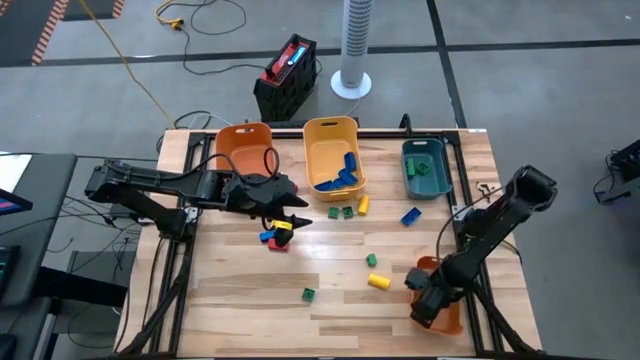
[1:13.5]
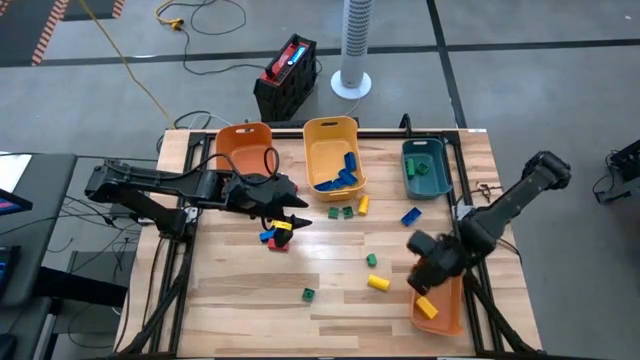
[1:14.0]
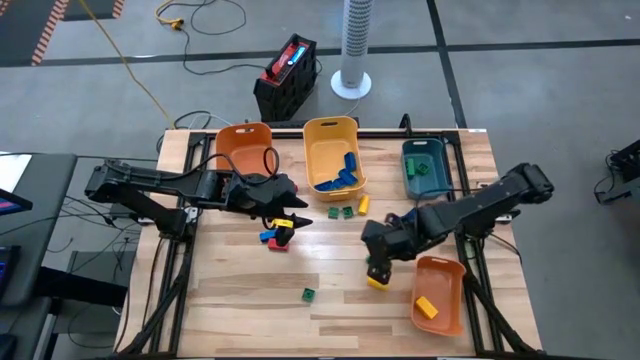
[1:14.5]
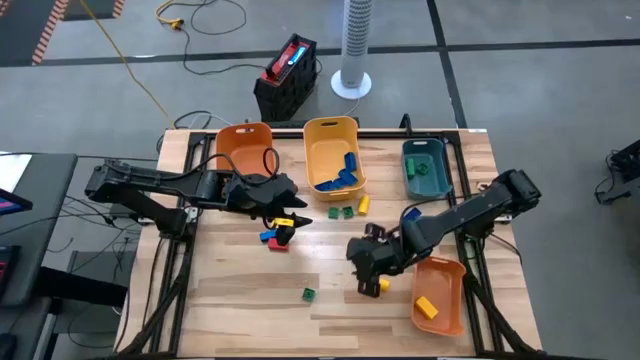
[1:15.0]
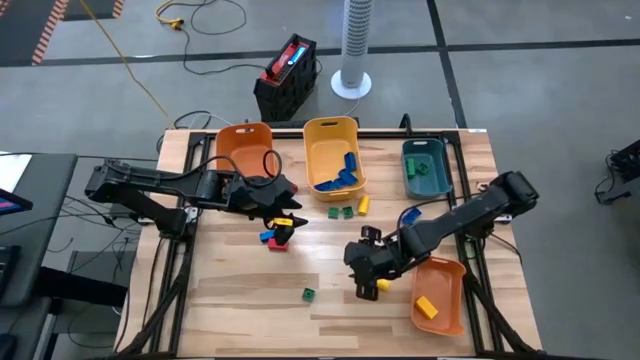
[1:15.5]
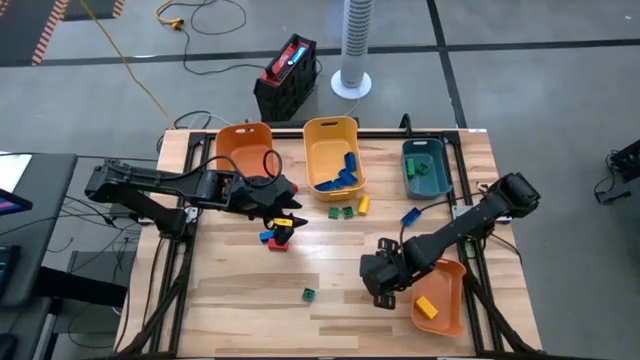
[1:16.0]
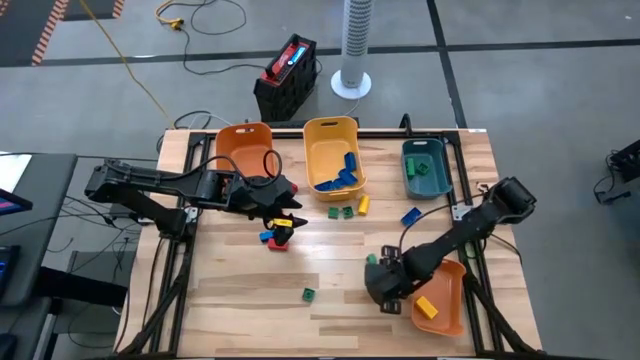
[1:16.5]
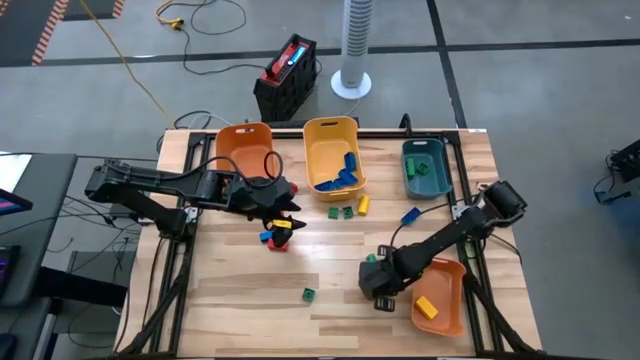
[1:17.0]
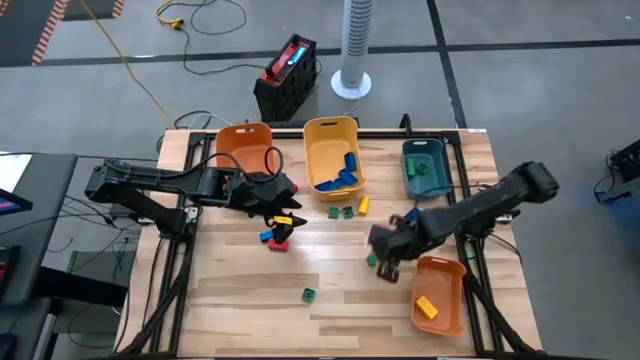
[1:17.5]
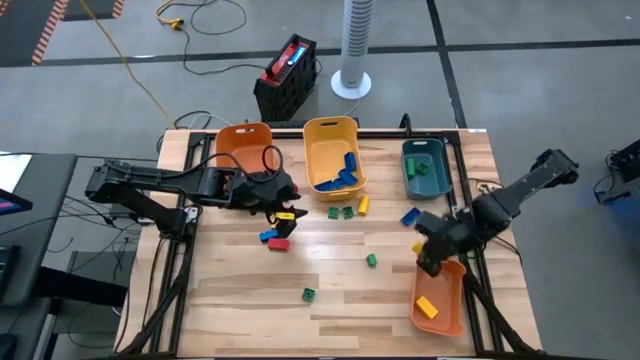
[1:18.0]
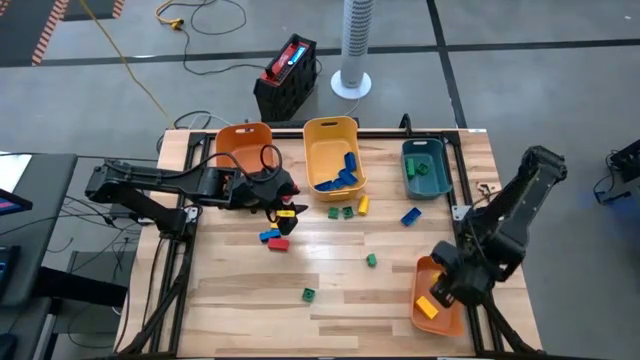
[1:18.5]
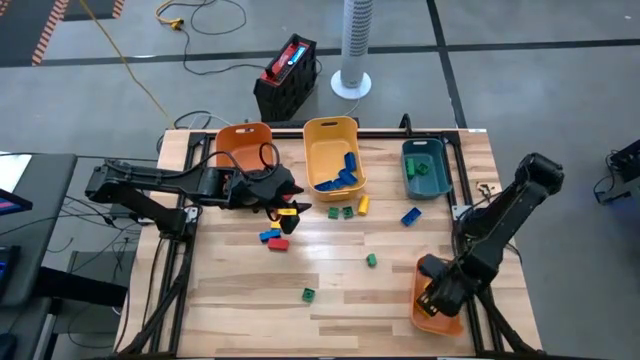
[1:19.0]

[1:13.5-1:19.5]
Task: Sort blocks
Put the yellow block into the bottom orange bin

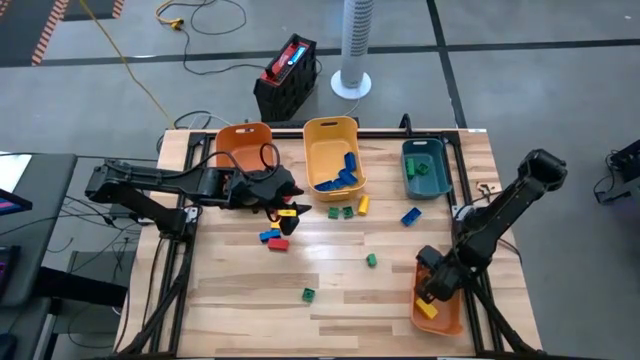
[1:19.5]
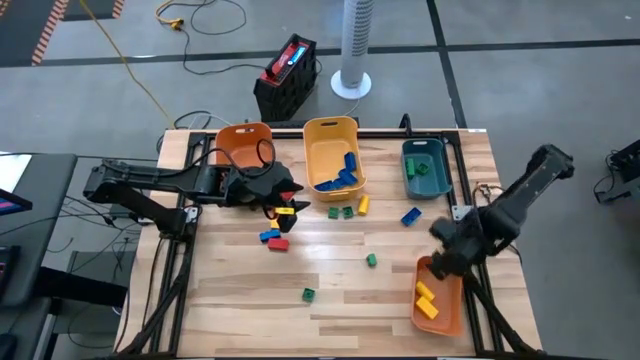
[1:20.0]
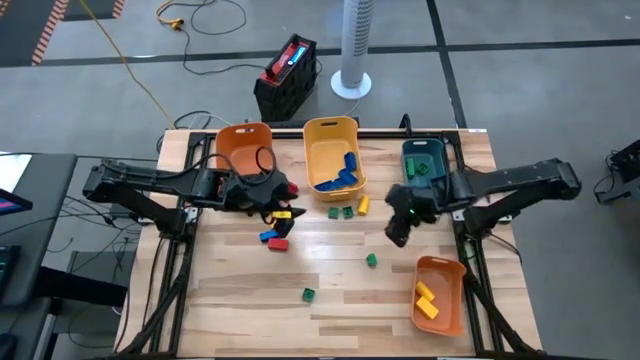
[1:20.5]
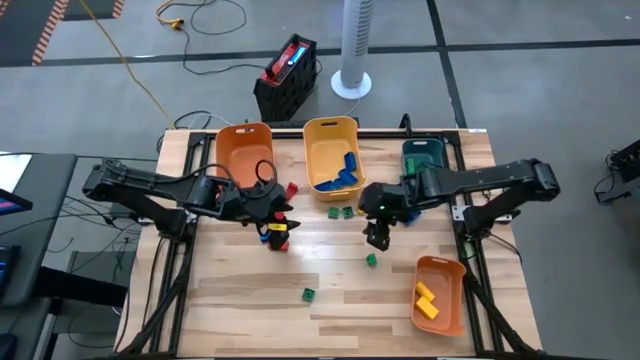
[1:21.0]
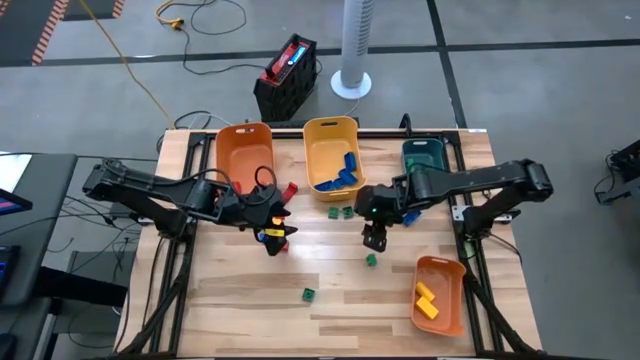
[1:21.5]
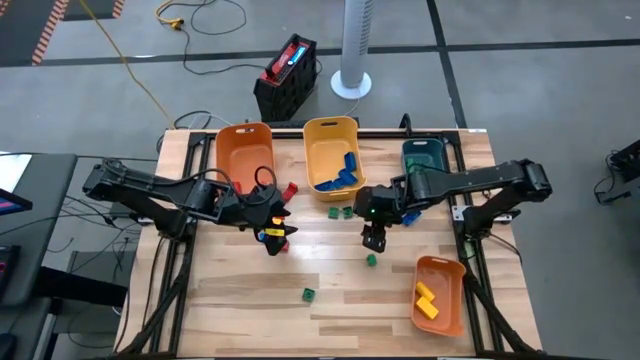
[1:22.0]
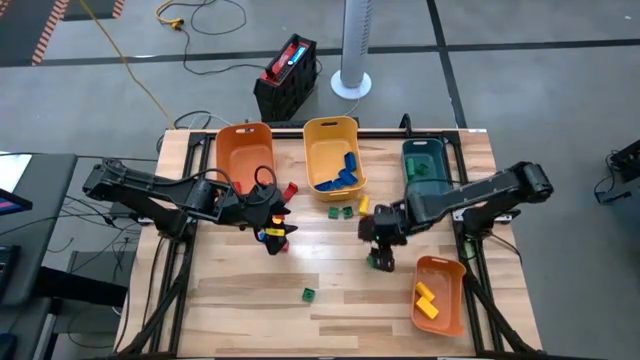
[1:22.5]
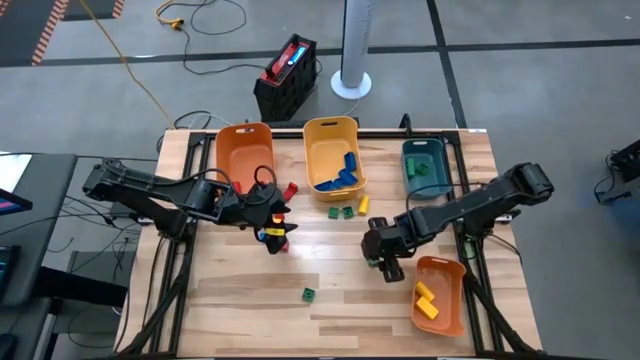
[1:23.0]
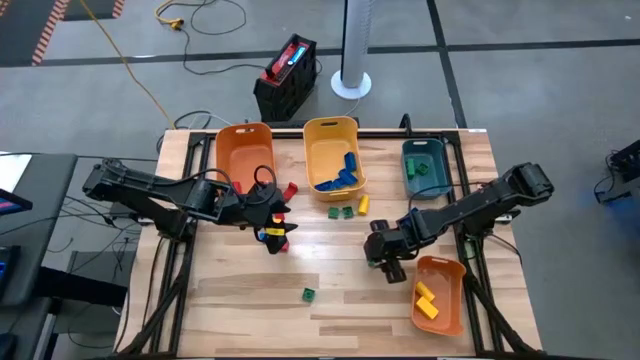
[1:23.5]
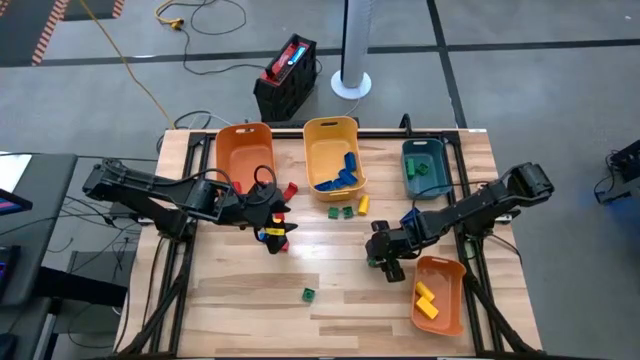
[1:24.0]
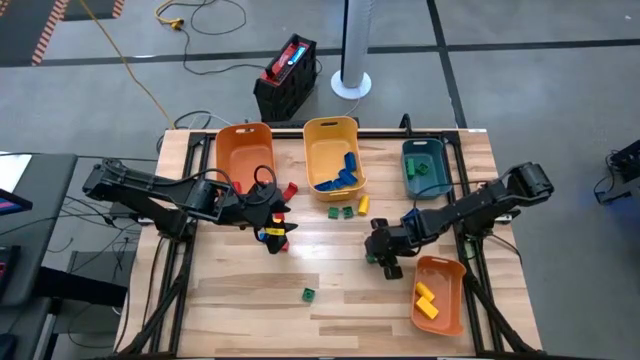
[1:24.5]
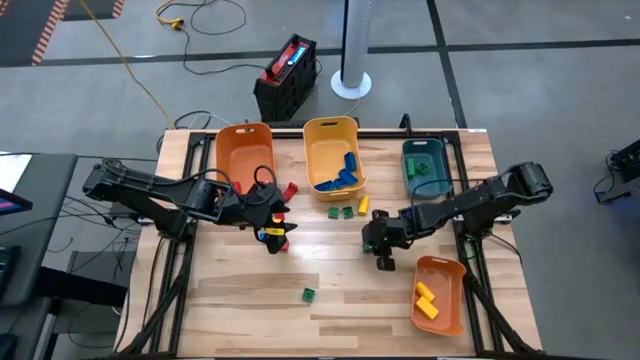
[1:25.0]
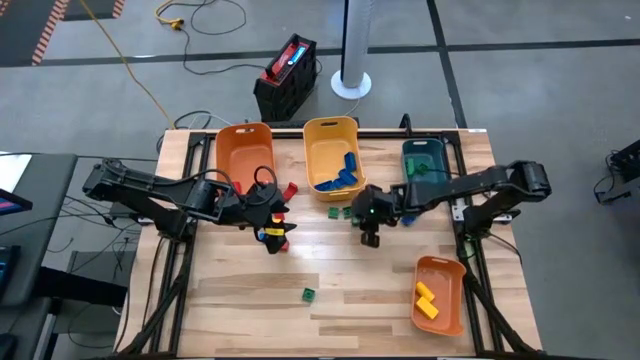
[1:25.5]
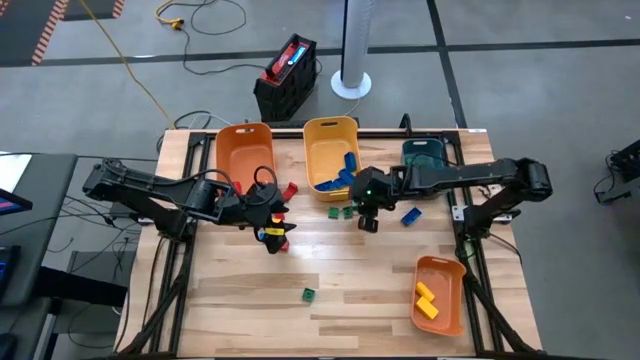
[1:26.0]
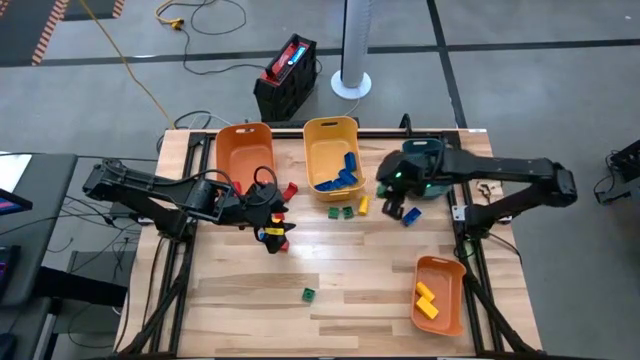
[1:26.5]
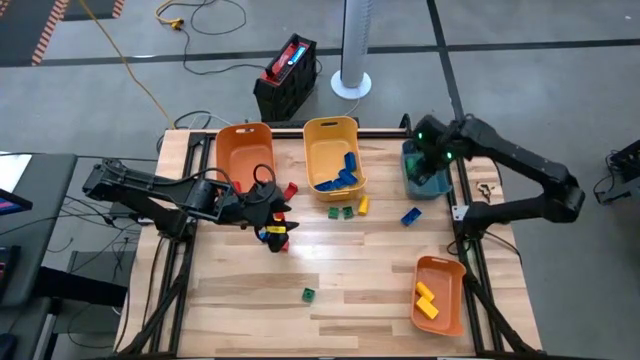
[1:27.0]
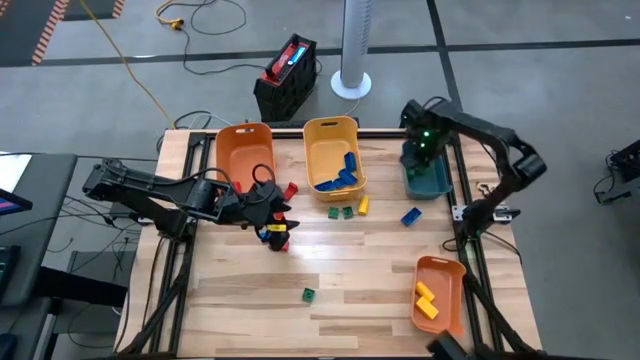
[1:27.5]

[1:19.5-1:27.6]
Put the green game piece into the blue bin

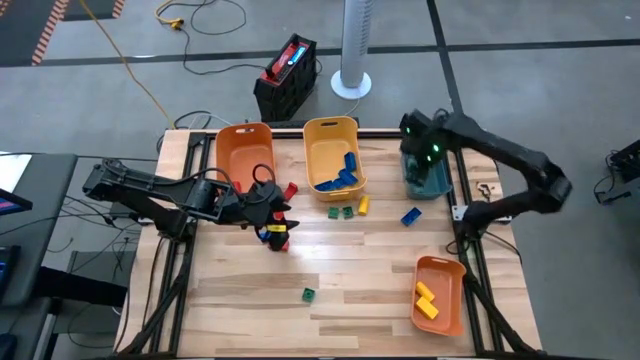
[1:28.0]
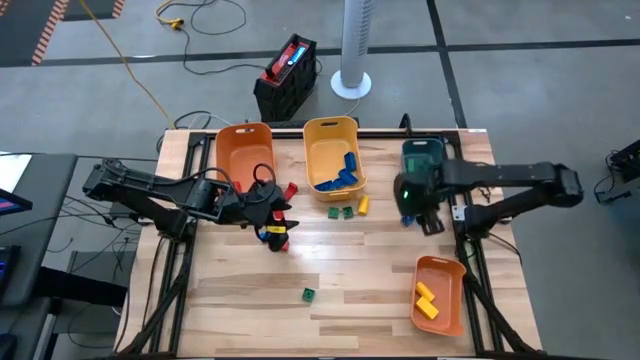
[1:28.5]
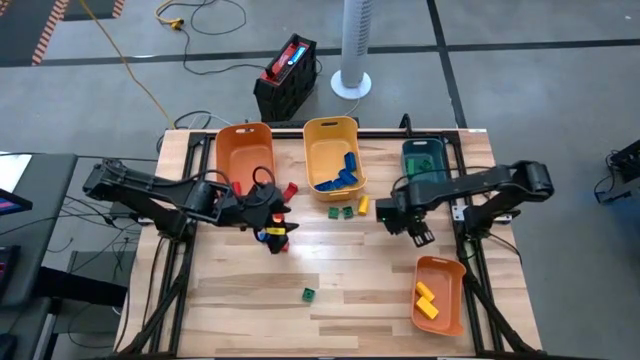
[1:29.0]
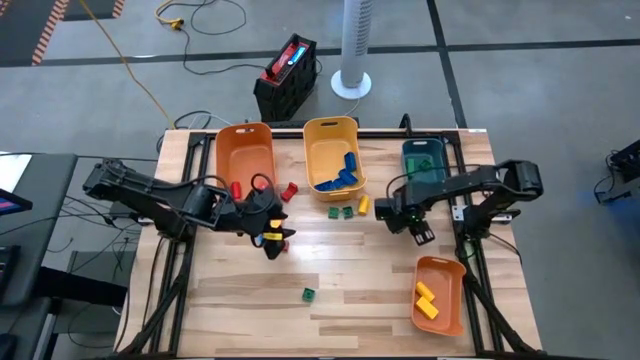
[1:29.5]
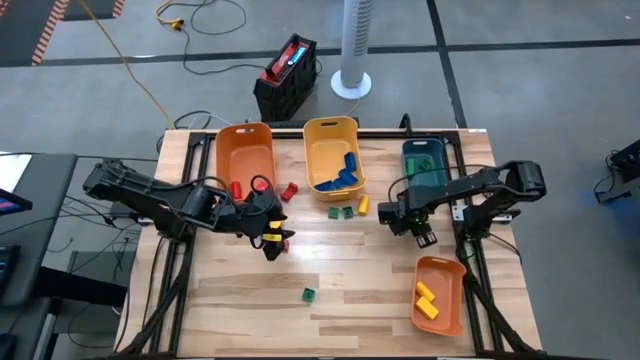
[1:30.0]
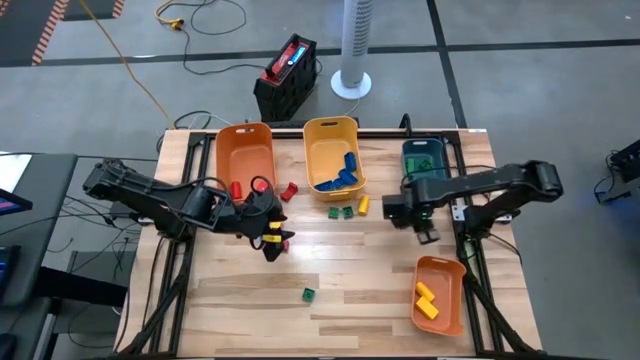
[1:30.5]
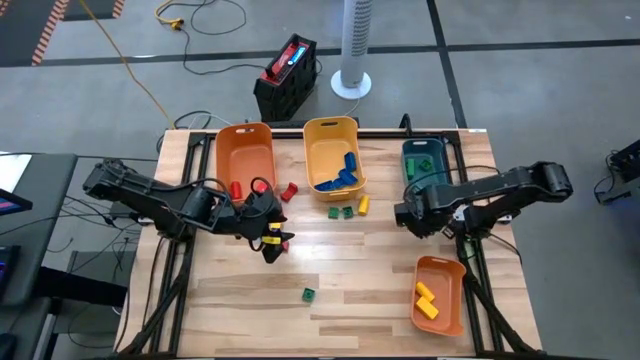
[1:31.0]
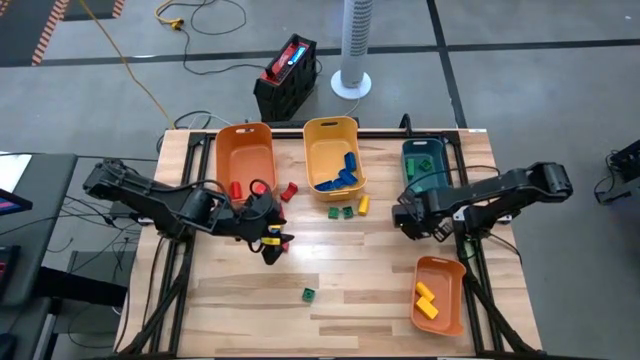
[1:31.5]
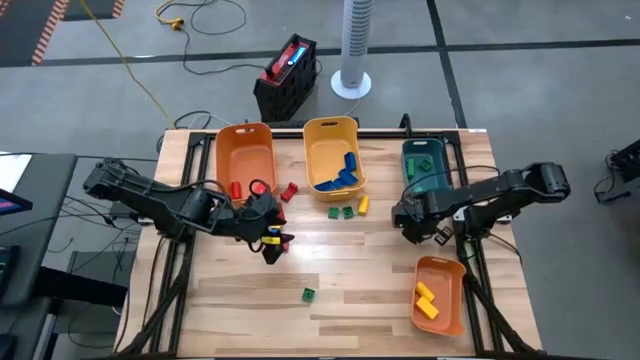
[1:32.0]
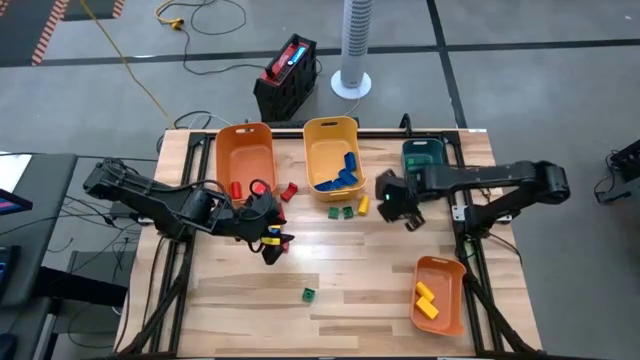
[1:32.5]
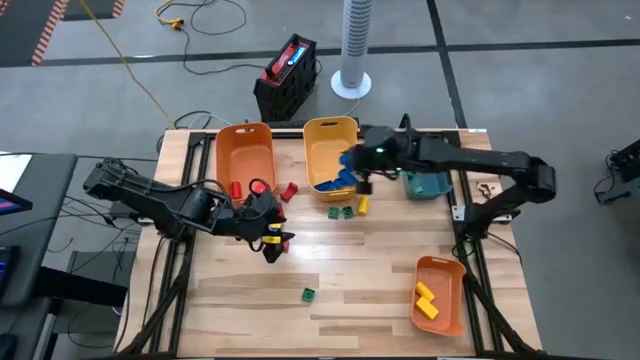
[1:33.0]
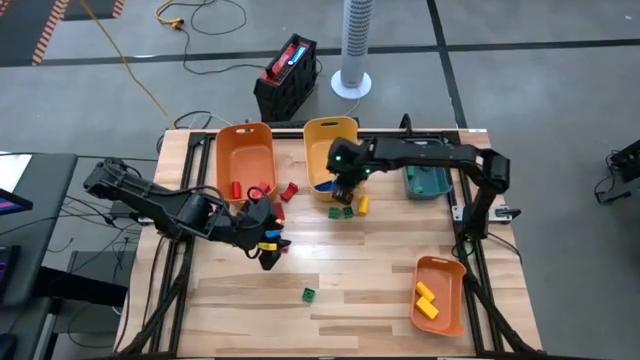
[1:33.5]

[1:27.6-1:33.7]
Put the blue game piece into the yellow bin

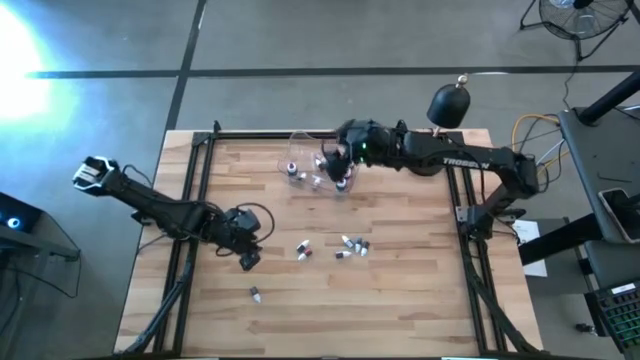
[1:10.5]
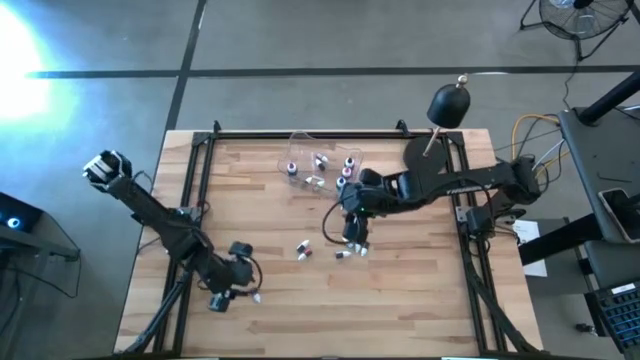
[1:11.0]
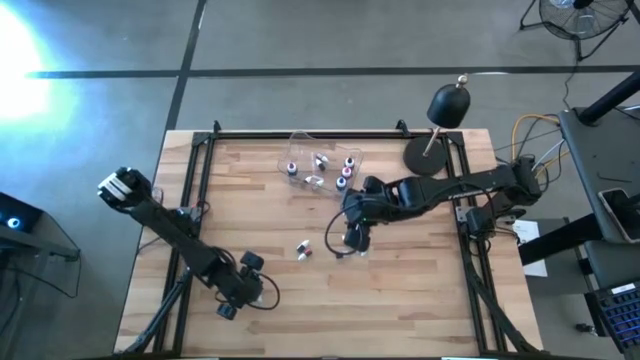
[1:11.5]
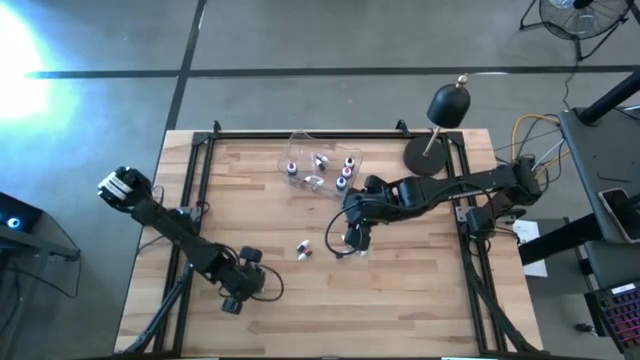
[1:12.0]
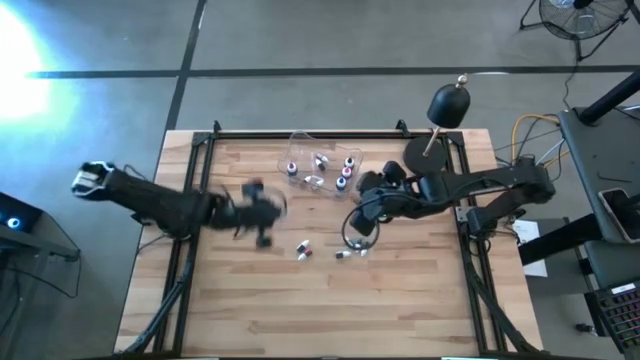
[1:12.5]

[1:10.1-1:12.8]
Task: Pick & Place food coloring
Put the bottom small purple food coloring bottle into the transparent bin
